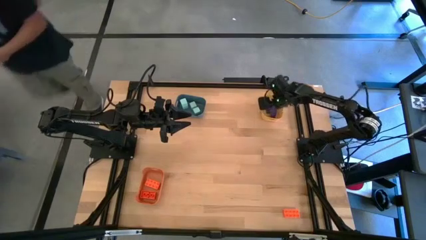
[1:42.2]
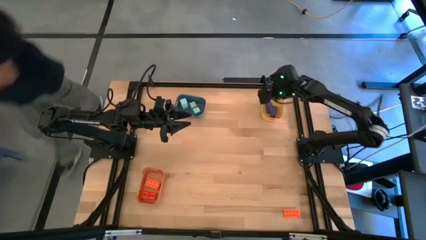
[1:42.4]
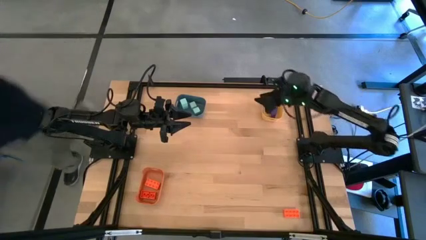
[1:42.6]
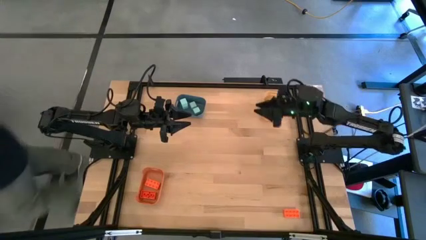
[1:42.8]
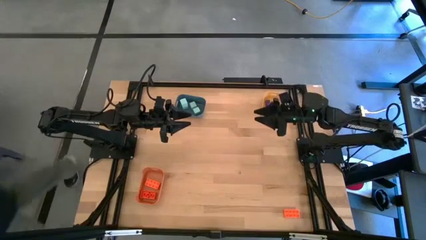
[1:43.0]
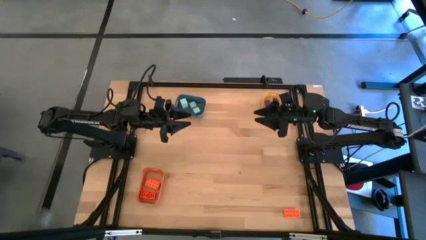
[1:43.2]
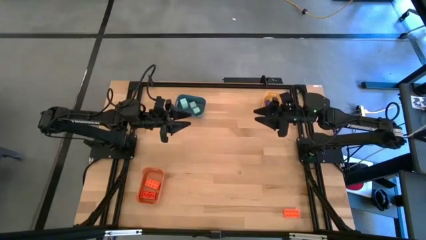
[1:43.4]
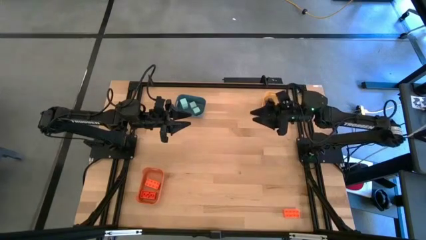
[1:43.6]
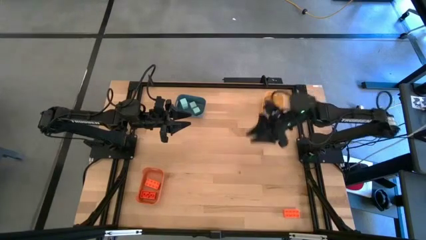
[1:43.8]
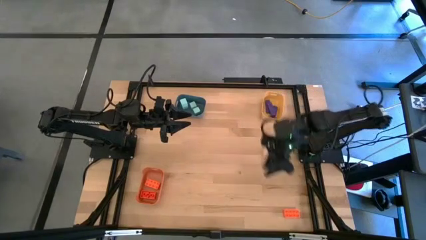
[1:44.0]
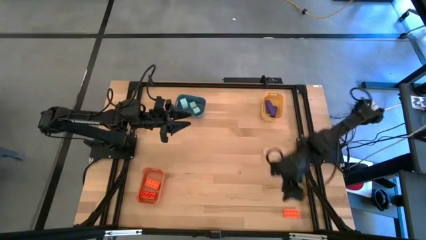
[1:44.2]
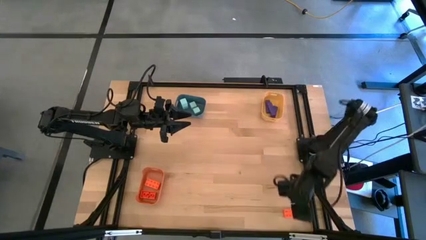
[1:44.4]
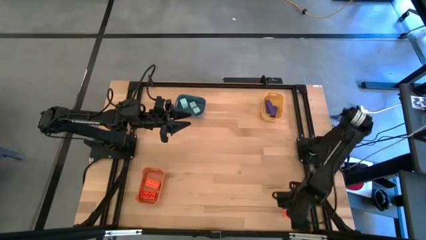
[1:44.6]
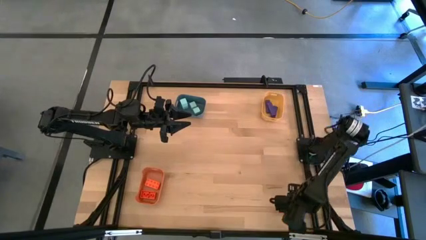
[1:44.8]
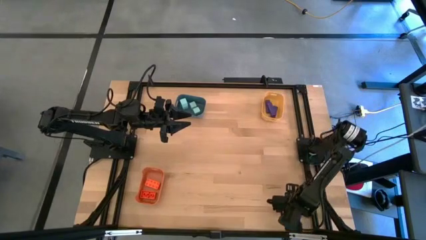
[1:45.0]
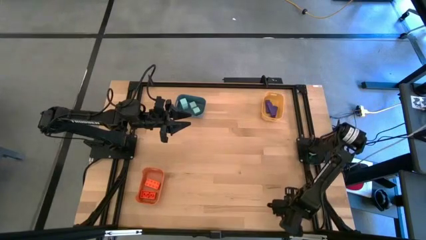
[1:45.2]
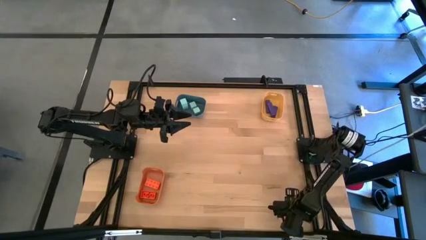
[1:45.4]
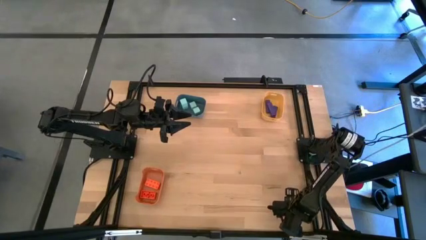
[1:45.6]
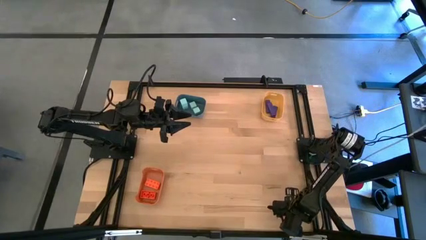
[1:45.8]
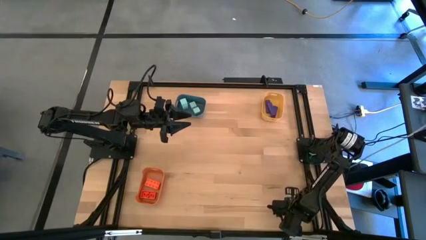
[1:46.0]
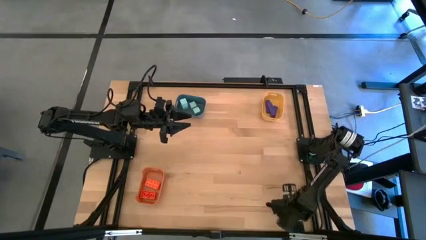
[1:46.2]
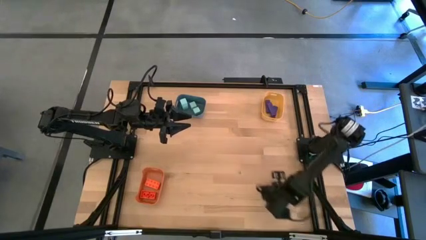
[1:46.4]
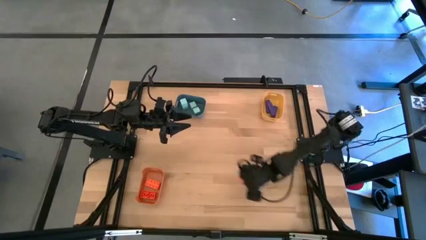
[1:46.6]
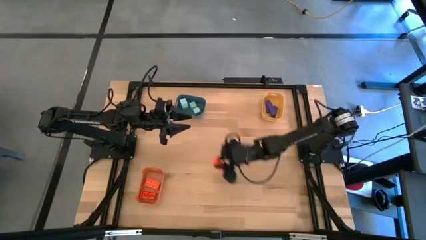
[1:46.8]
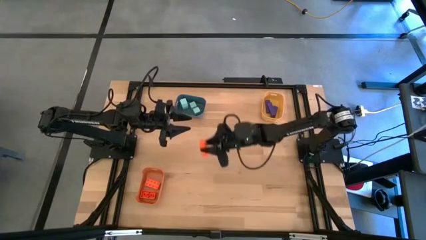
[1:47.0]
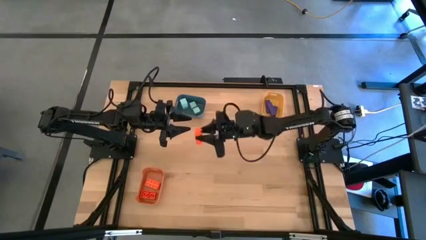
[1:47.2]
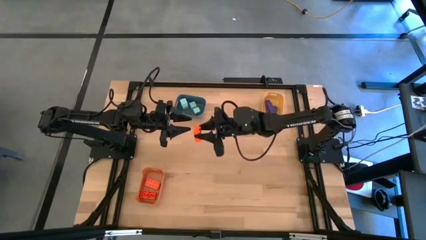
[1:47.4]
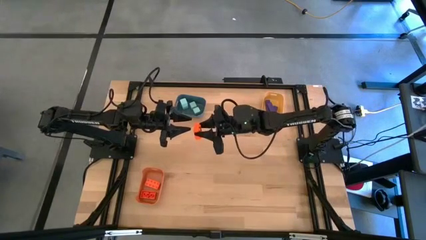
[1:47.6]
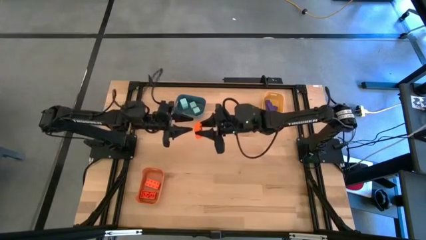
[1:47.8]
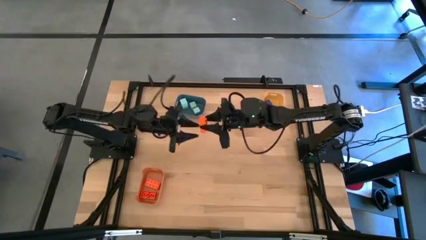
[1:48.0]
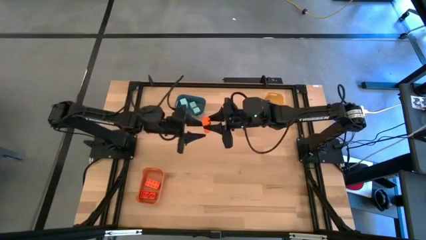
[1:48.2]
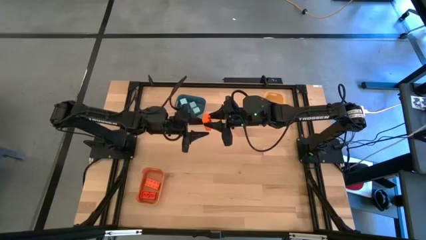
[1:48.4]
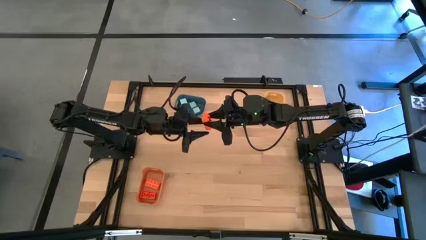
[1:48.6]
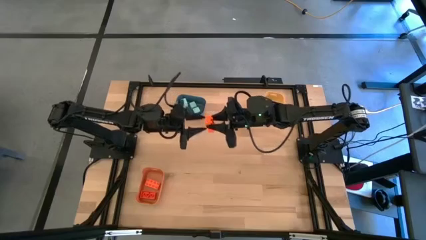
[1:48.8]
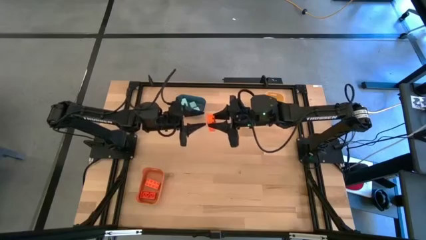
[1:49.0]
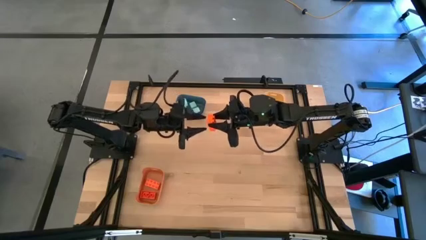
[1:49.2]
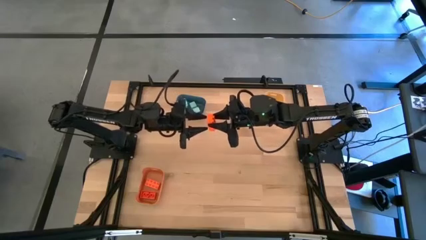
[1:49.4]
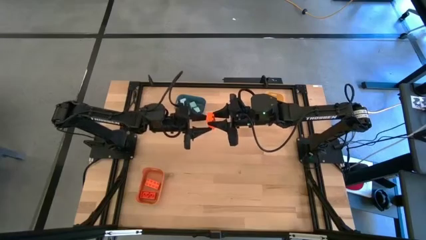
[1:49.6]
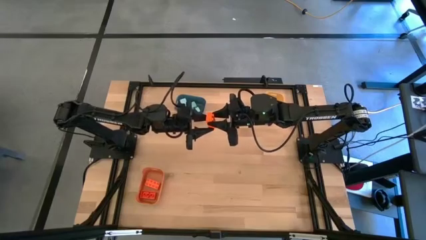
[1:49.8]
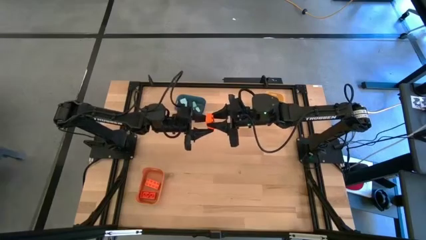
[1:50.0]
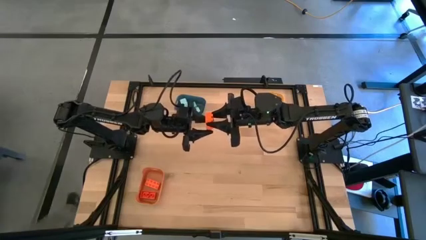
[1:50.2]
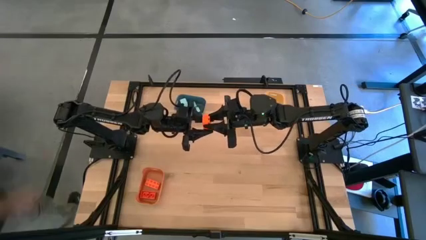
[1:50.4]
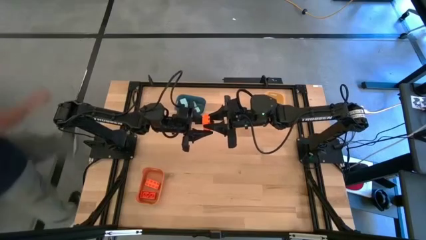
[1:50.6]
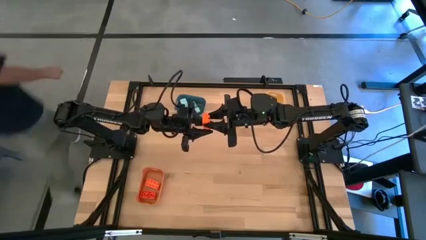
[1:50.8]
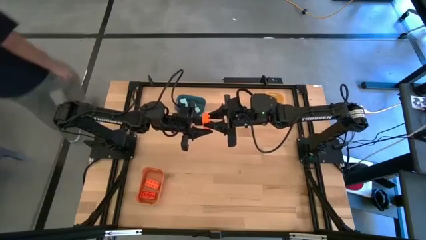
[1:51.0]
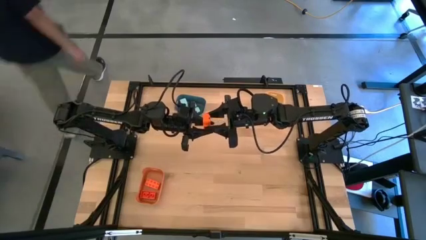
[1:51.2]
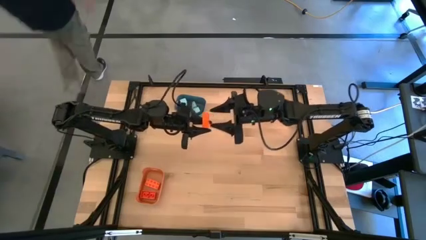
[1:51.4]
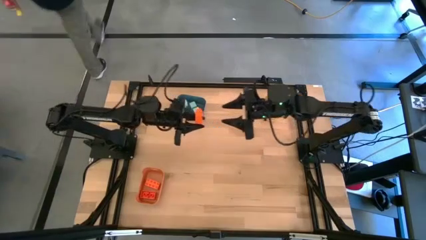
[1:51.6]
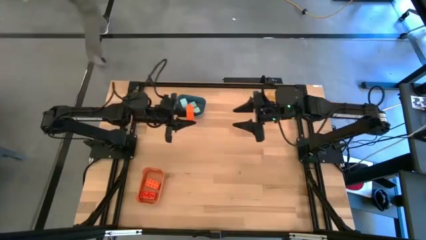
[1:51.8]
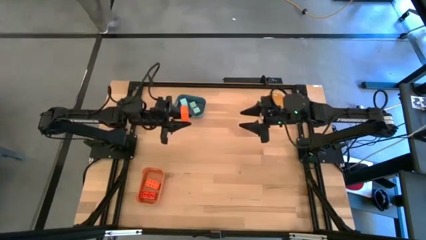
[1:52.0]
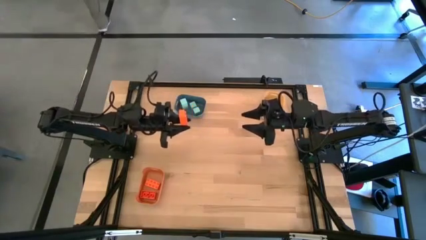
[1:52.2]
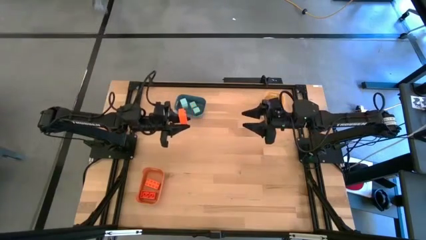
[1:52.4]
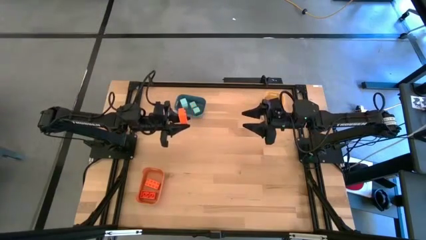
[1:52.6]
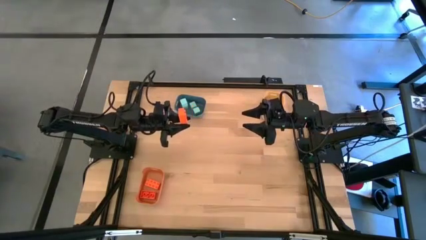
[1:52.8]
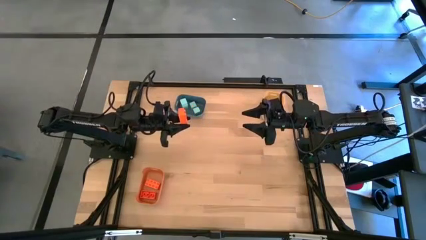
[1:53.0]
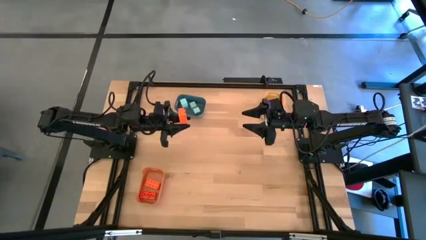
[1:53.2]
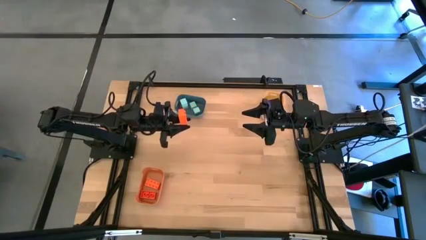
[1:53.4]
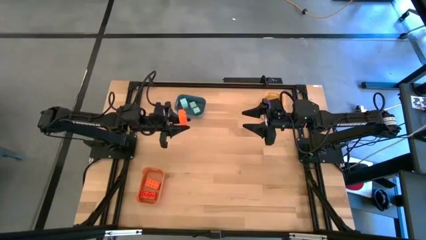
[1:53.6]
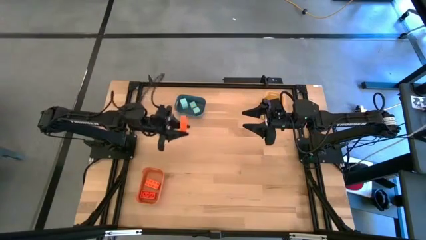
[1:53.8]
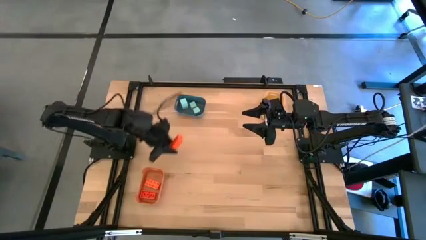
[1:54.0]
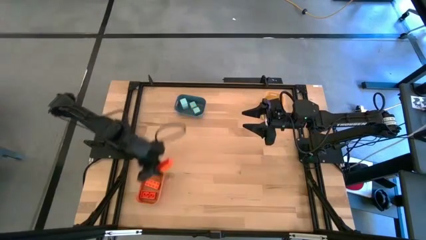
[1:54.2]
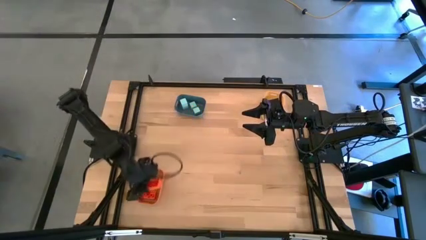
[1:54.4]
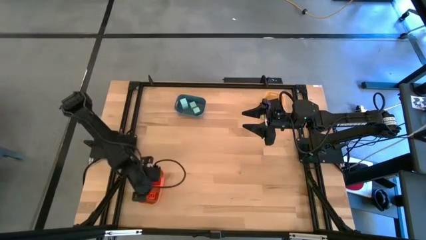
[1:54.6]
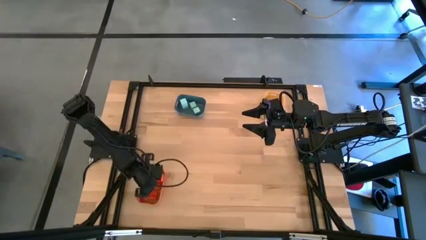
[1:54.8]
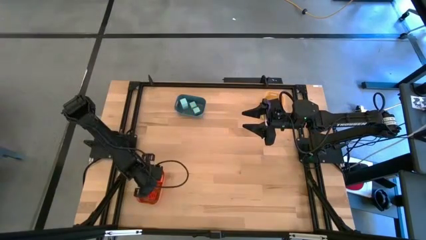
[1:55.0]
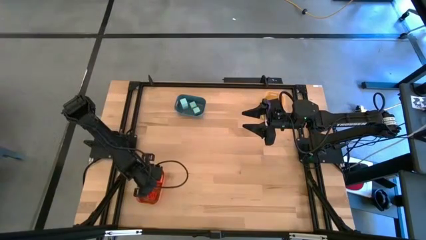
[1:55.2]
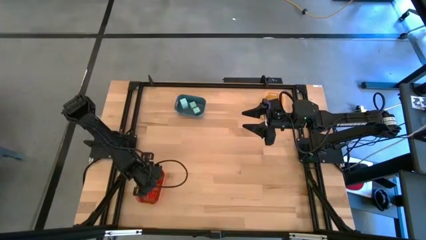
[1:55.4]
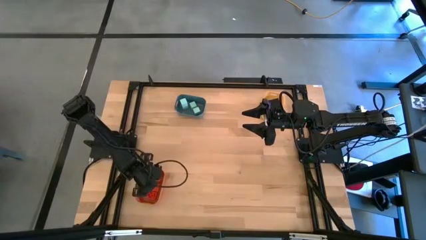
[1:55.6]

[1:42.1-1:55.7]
Task: Sort & place blocks by color
Put the orange game piece into the orange bin

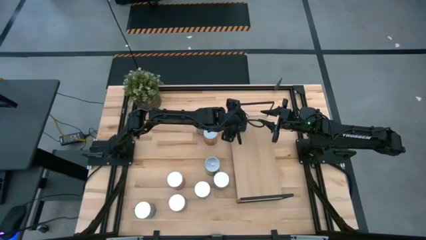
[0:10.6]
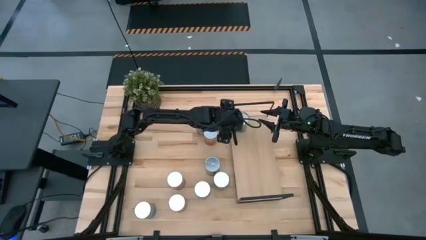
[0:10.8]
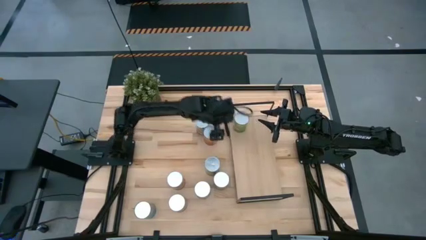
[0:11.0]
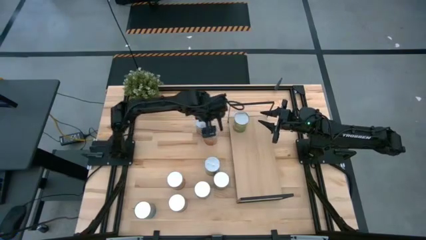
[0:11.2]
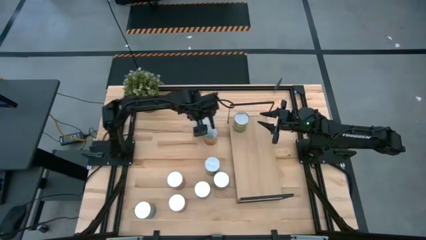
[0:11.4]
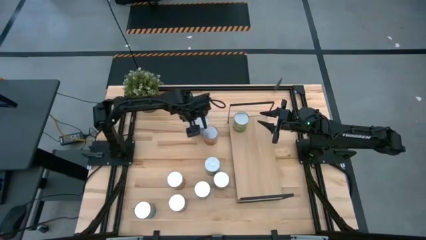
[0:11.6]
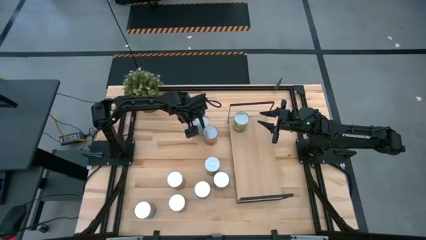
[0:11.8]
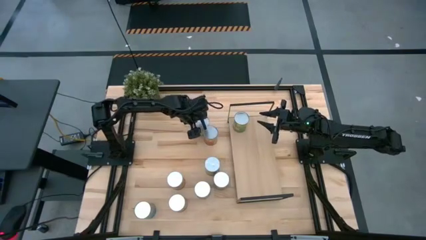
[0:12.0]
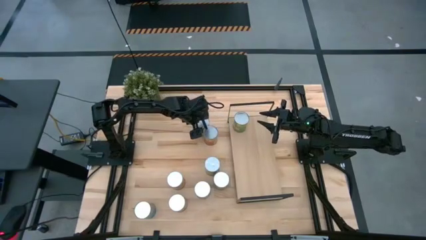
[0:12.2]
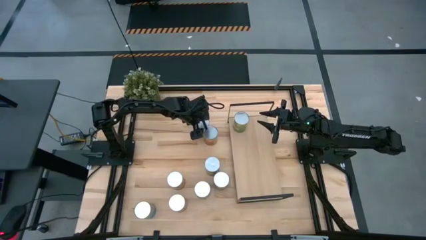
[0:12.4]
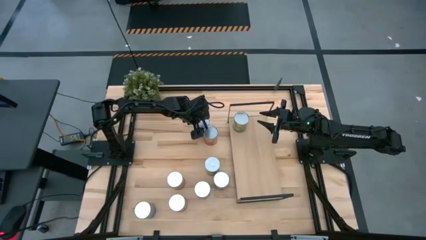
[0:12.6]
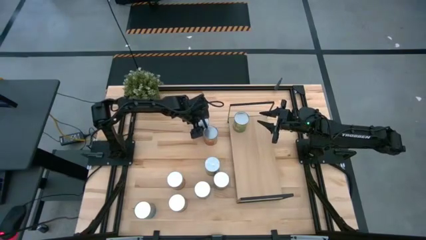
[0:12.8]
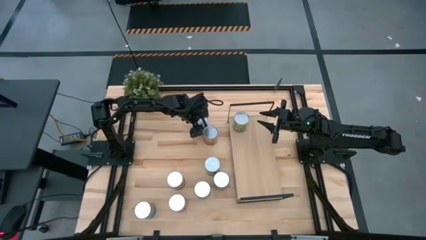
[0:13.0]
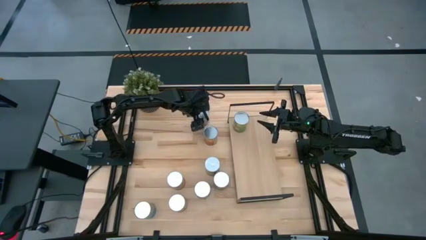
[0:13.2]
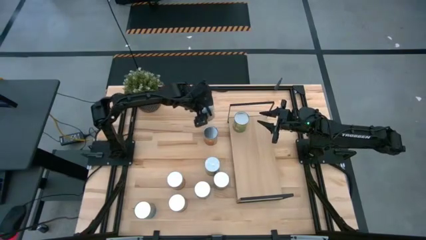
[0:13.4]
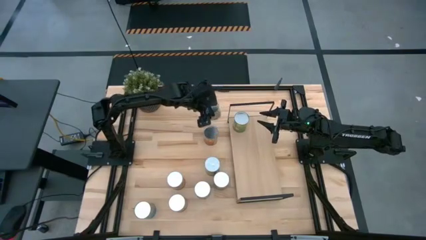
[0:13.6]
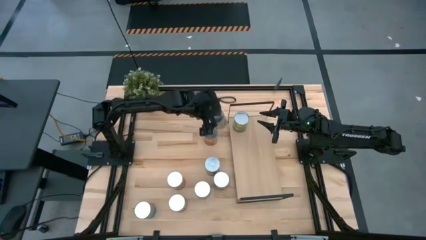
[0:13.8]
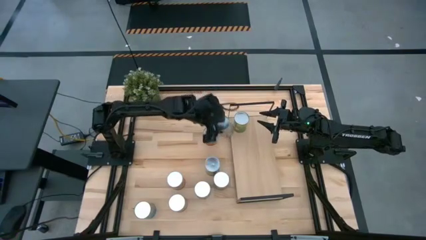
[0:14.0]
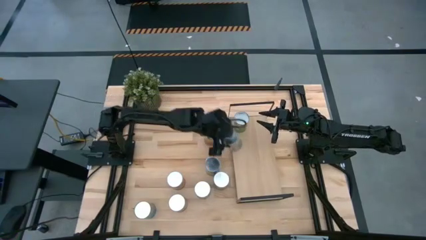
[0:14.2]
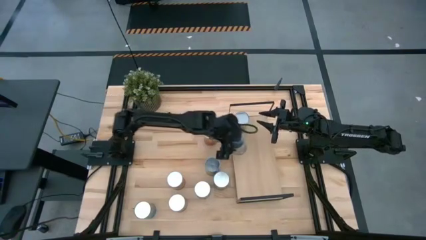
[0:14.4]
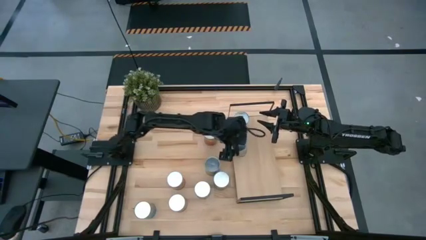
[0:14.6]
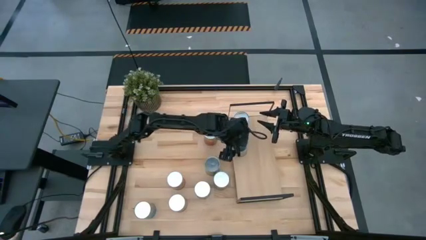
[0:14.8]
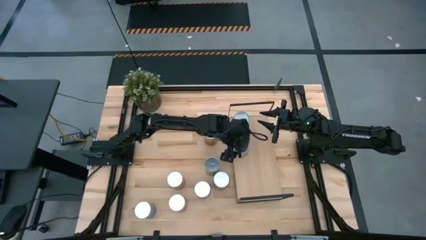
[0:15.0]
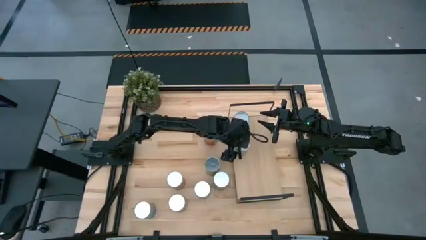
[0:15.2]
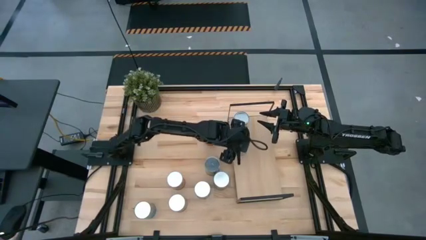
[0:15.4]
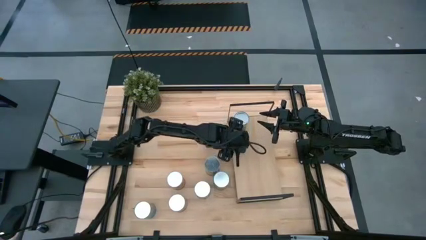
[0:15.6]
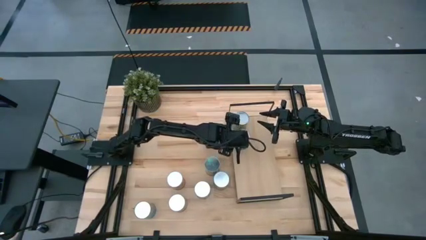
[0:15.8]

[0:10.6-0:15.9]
Task: Pick and place cans onto a shelf
Put the canned peaches on the shelf
